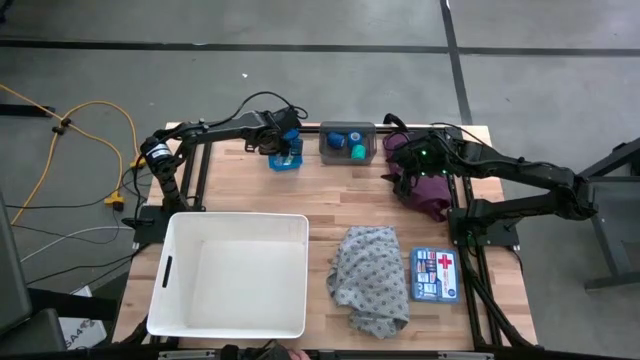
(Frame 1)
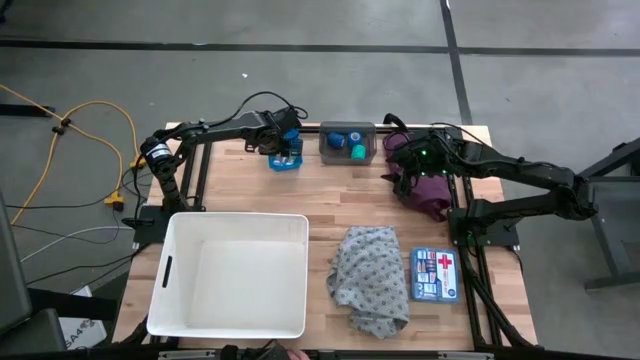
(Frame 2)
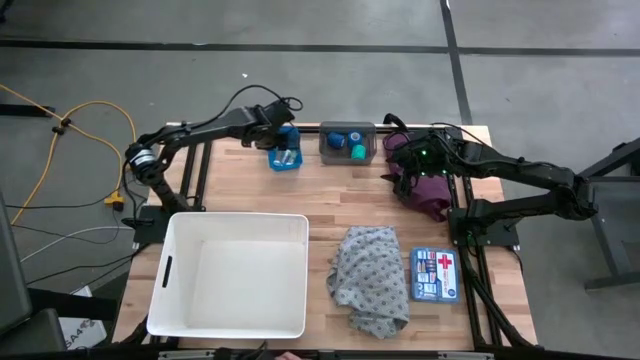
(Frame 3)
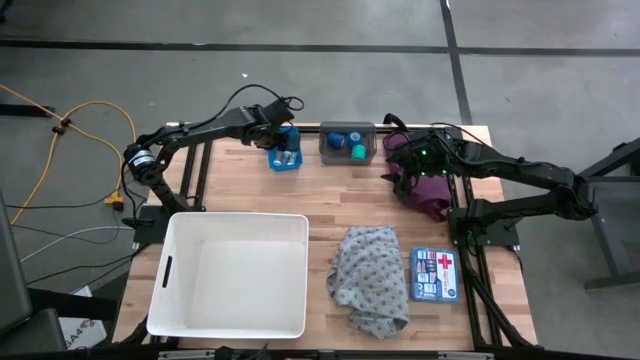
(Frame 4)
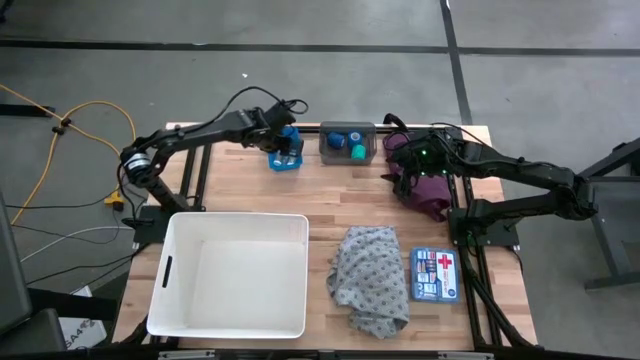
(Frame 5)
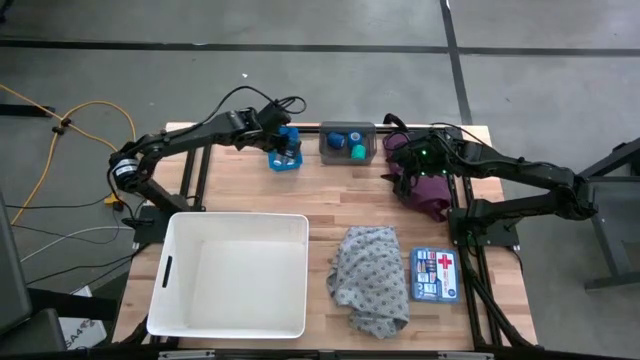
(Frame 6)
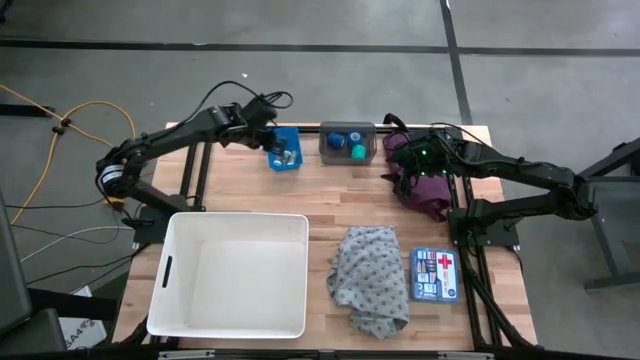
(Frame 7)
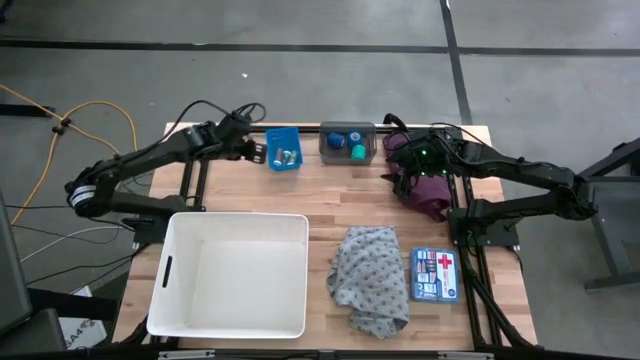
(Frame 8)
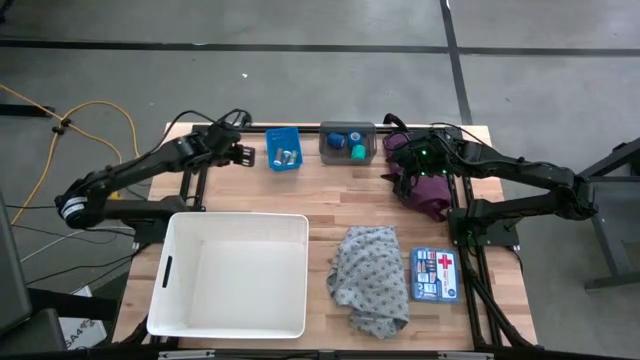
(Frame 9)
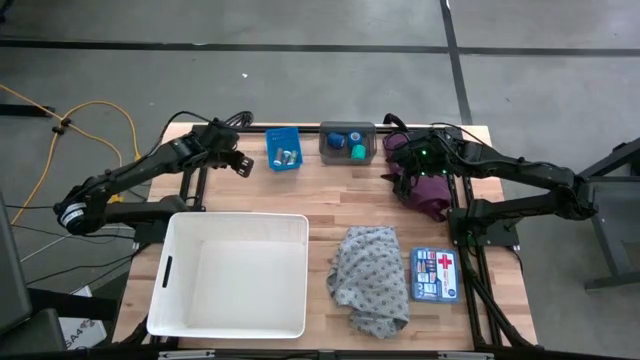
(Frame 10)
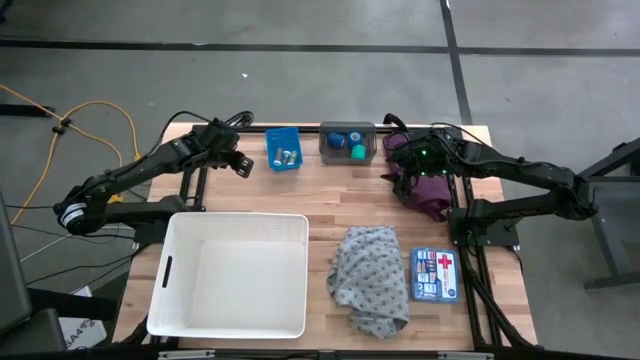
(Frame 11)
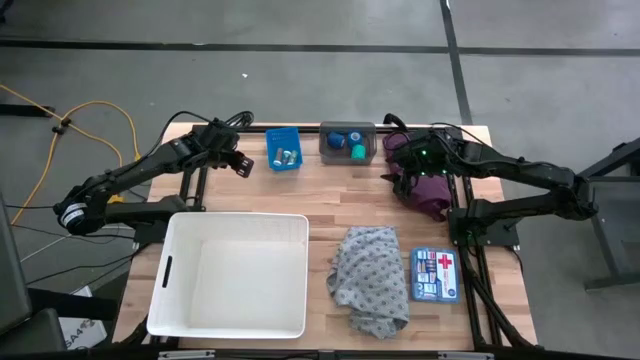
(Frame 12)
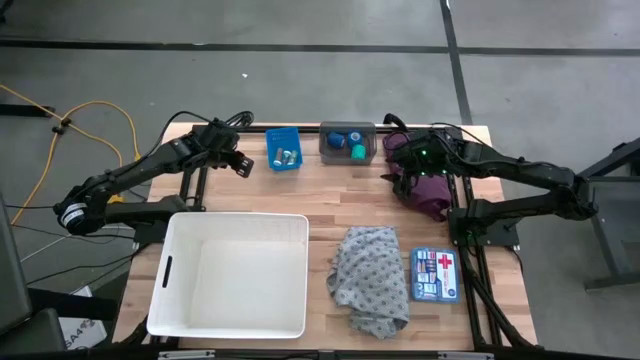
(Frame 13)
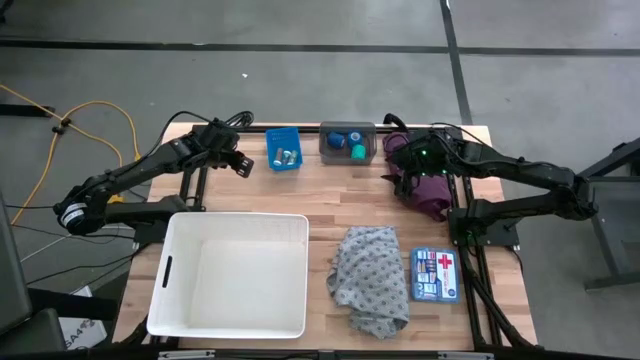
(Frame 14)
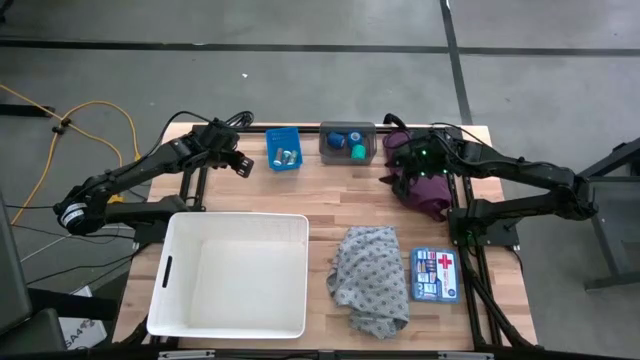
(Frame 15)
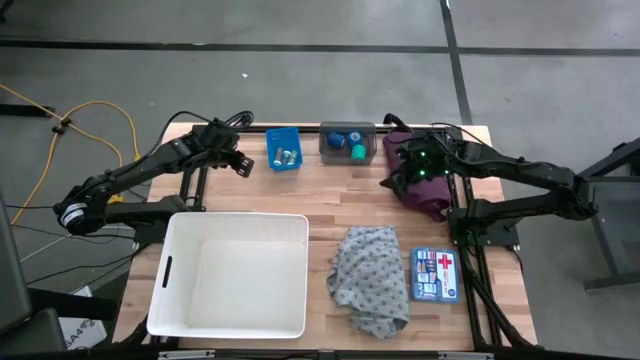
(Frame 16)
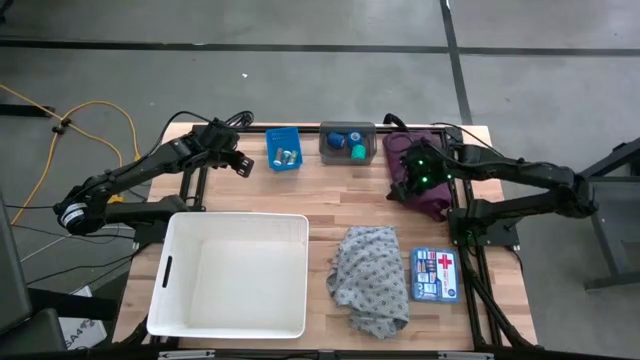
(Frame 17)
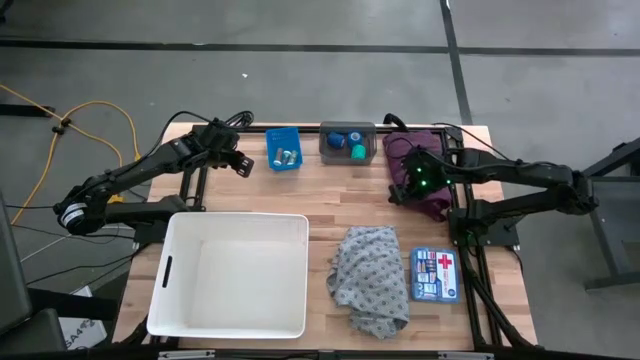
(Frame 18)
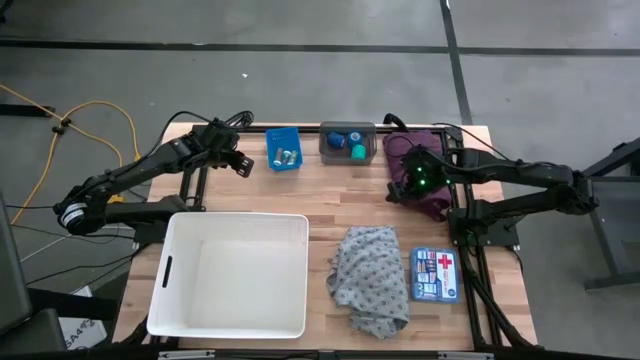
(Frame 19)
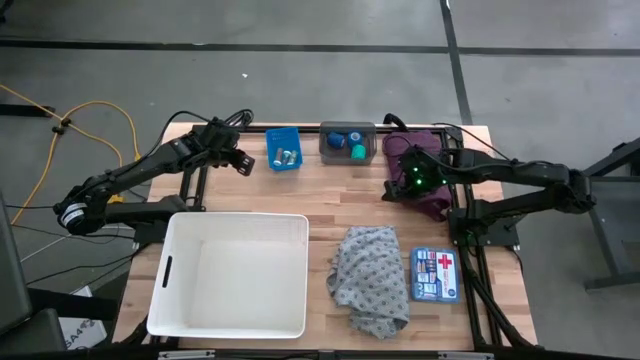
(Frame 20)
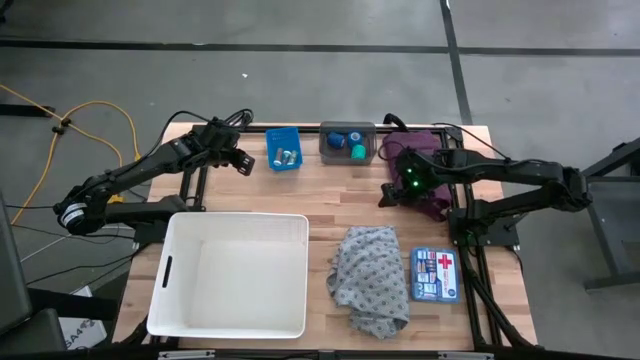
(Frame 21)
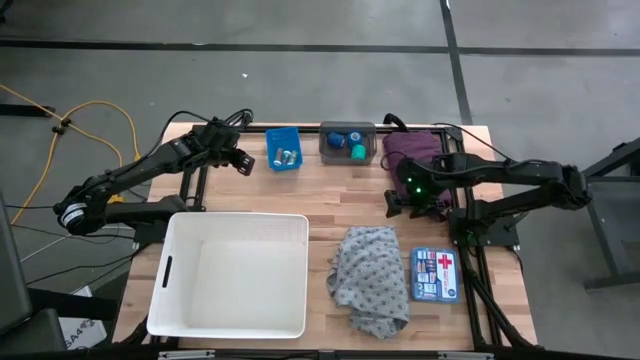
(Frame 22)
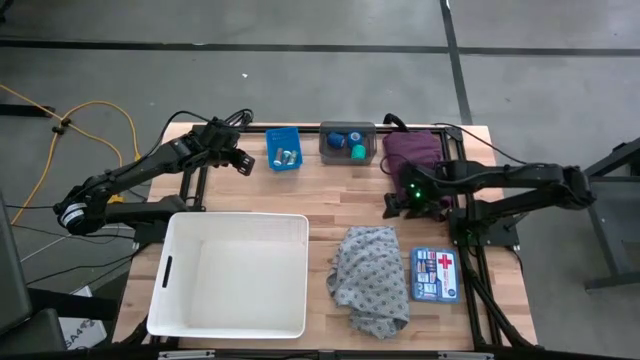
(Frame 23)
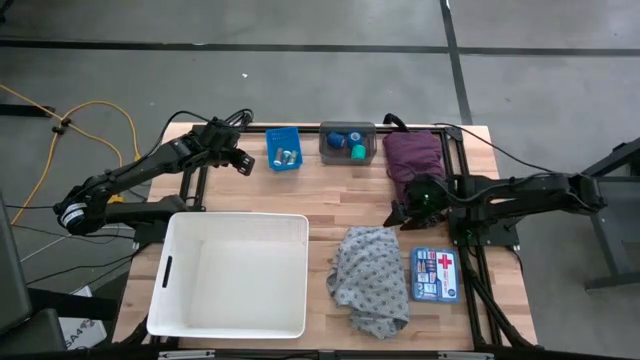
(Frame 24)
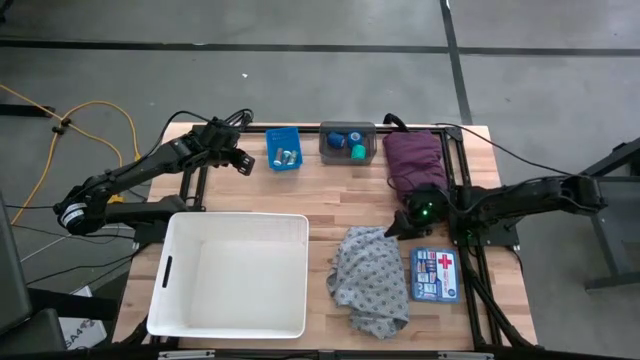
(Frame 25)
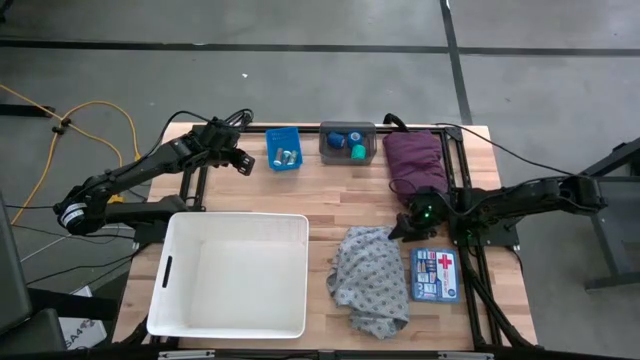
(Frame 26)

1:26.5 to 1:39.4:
Task: Pick & place medical supplies in basket/bin
Put the patient gown into the white bin

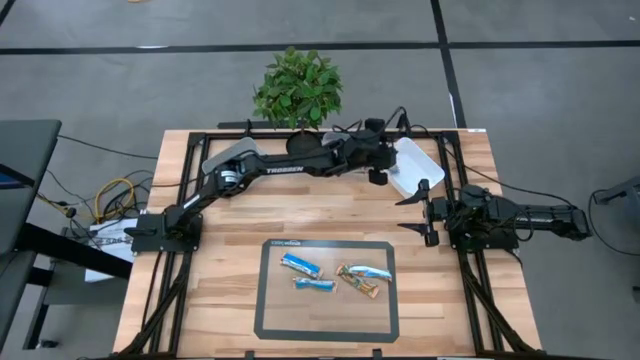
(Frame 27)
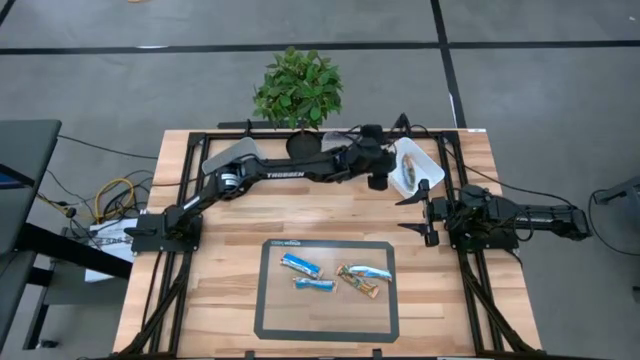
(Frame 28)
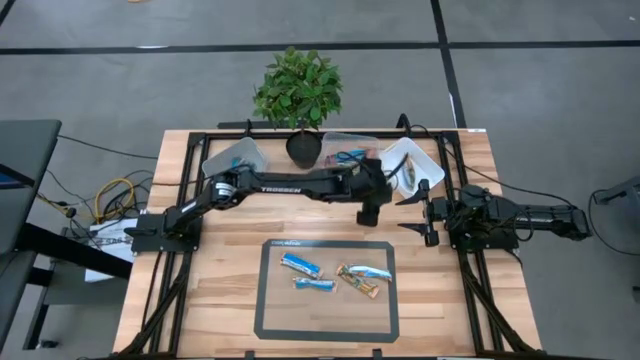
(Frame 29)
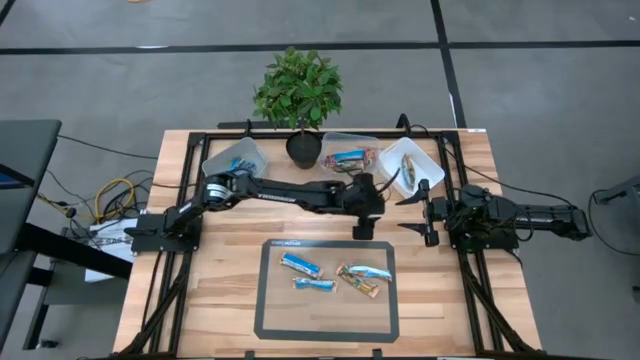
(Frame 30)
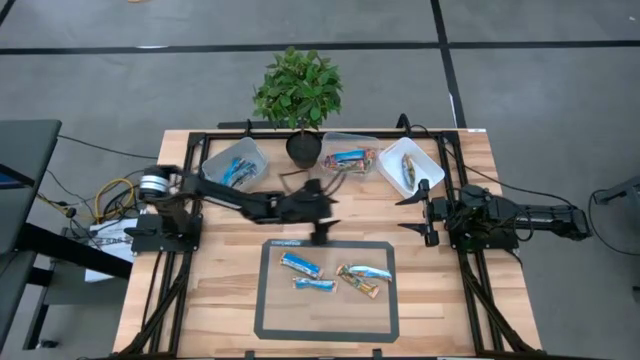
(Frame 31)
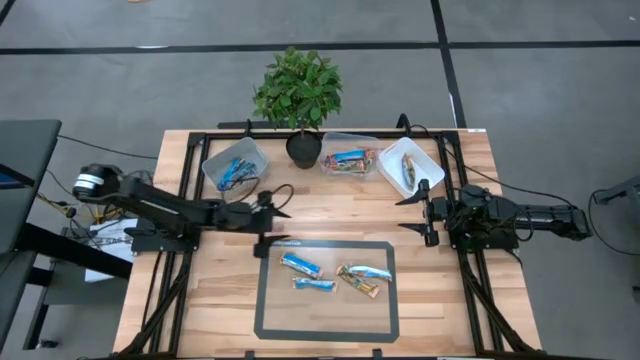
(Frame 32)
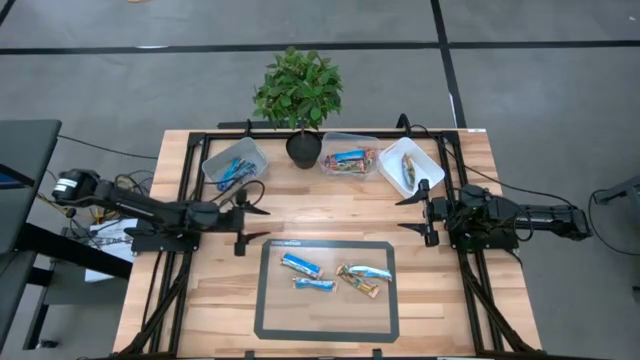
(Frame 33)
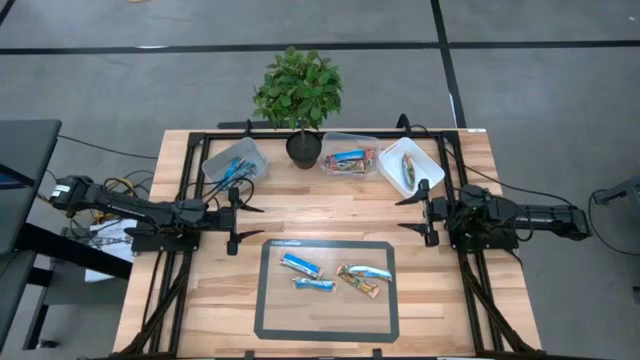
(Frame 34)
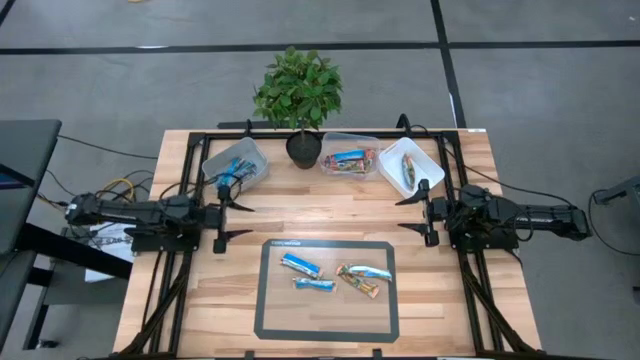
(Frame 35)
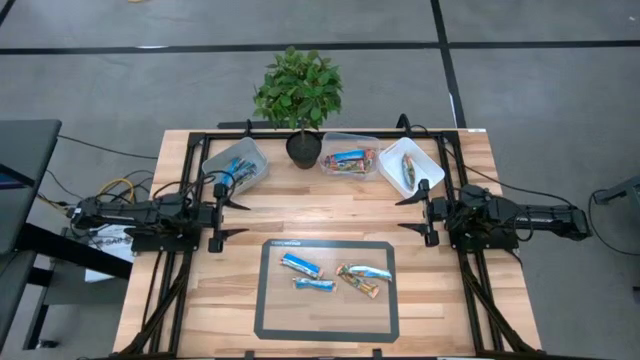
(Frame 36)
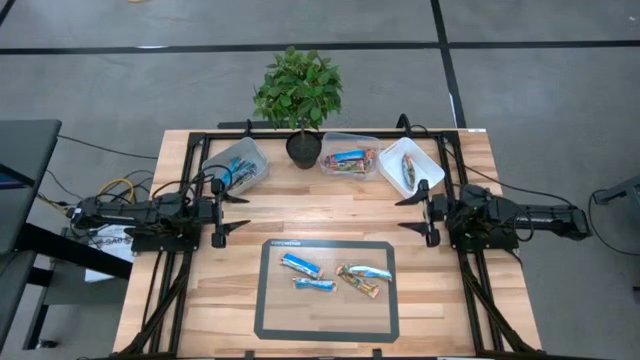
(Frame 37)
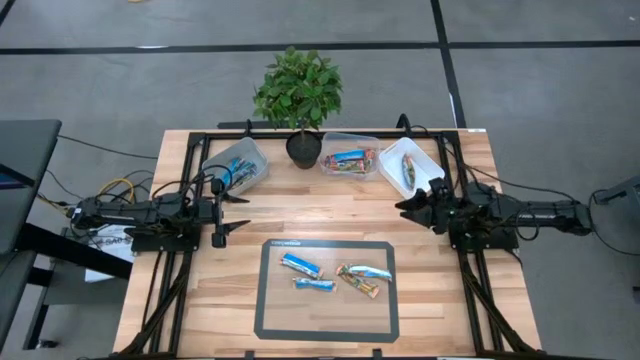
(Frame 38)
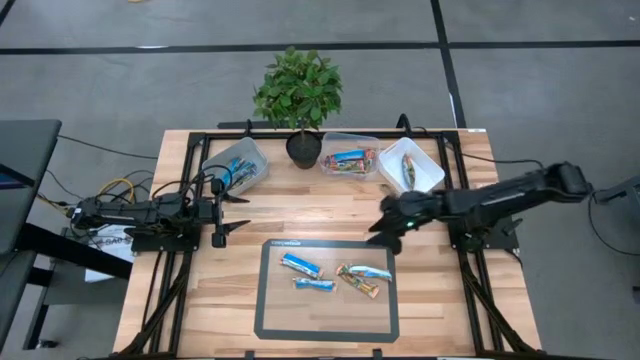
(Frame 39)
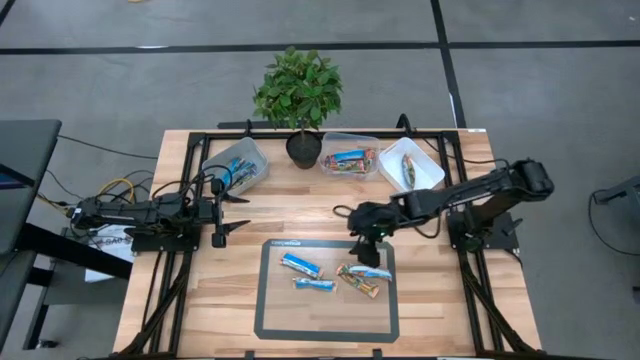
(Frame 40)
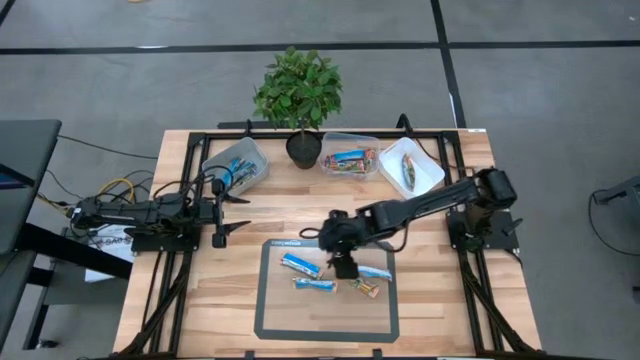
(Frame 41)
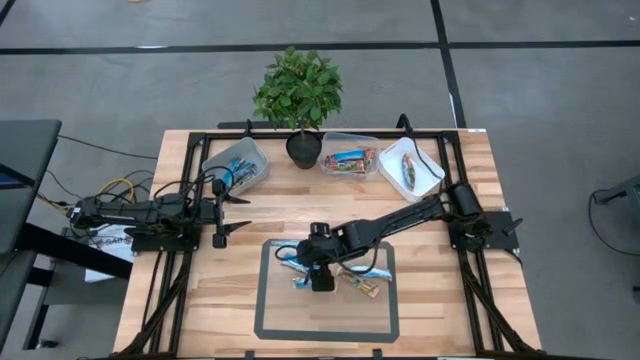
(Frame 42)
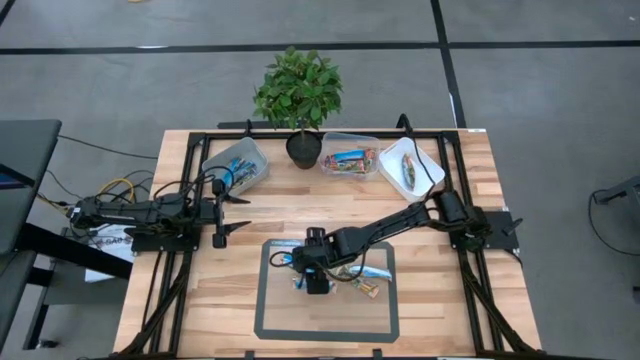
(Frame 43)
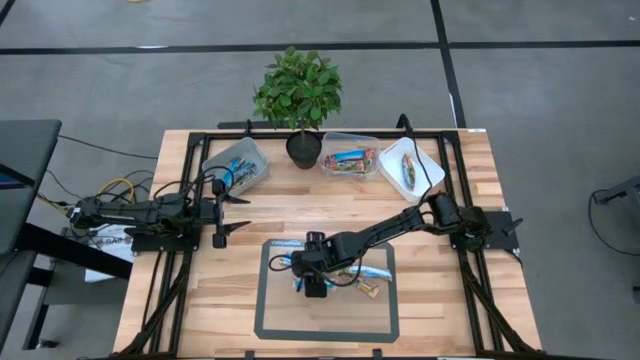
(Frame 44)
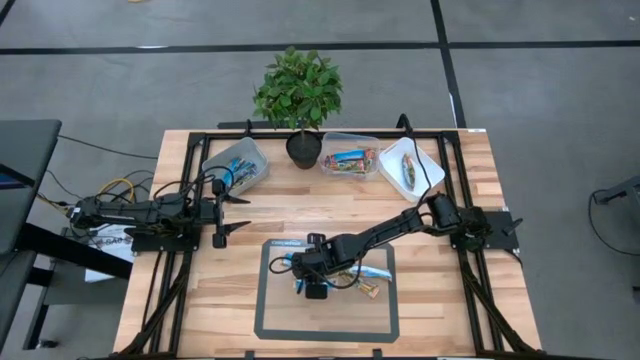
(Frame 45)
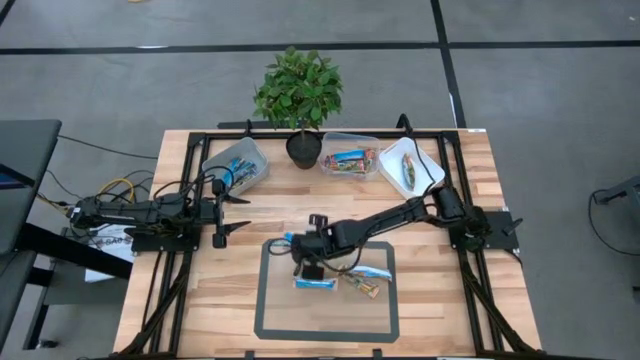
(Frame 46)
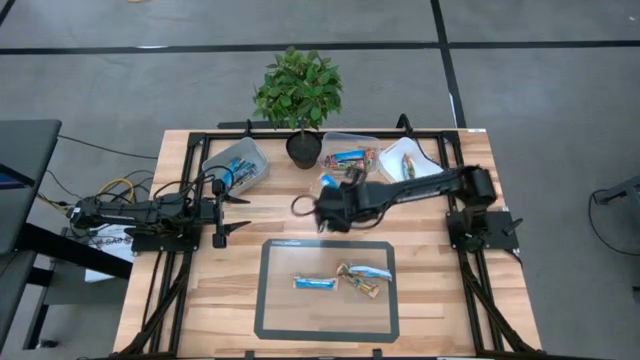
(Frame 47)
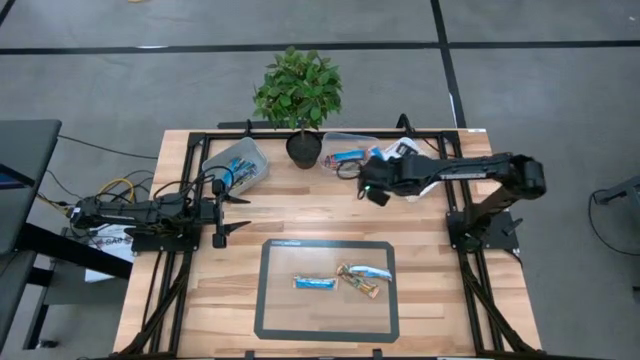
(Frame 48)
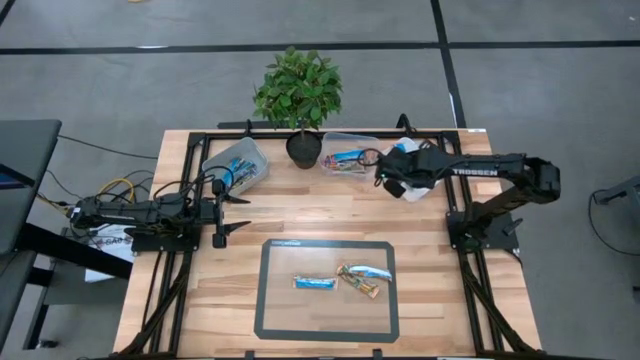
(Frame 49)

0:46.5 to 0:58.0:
Task: Pick and place Granola Bars by type
Put the yellow granola bar into the white bin
